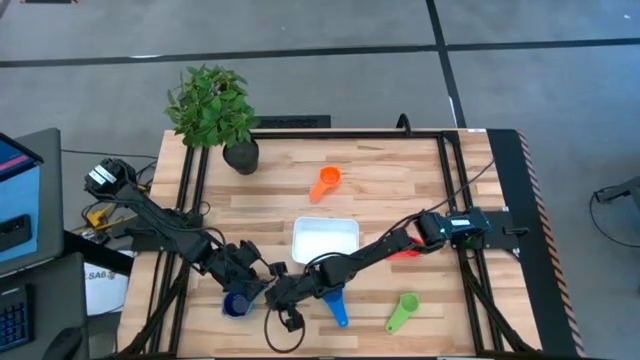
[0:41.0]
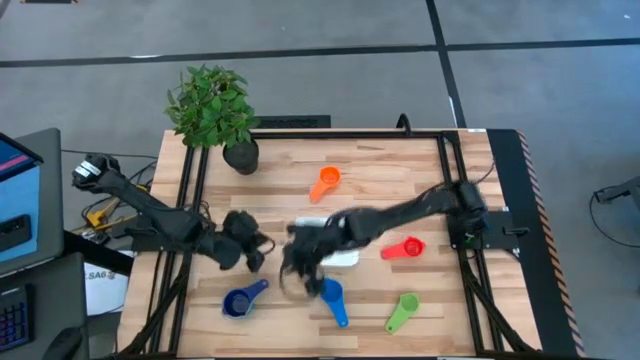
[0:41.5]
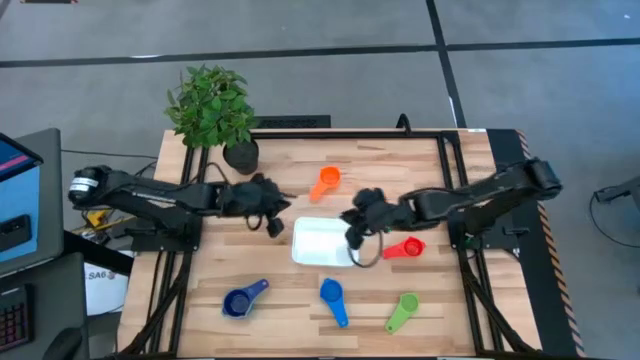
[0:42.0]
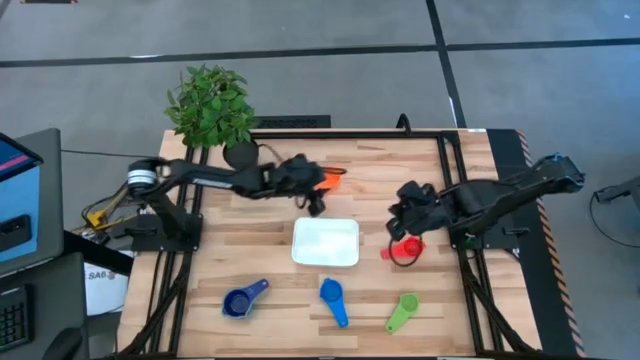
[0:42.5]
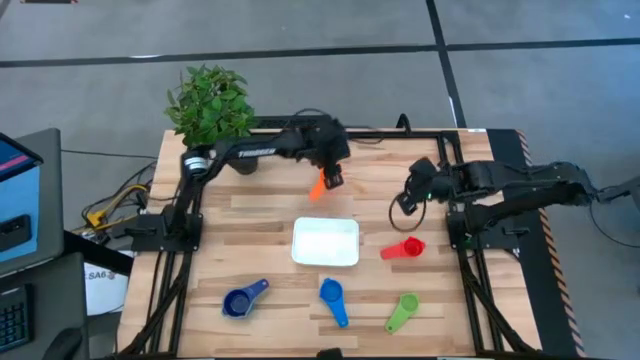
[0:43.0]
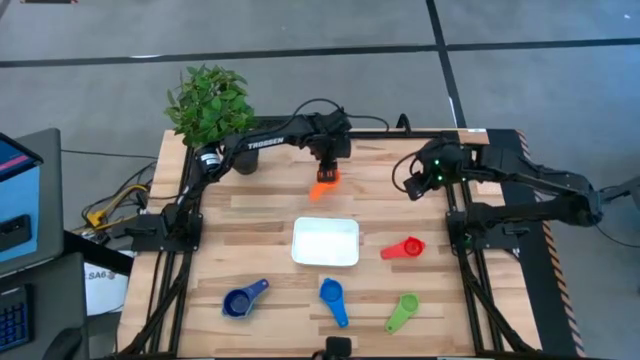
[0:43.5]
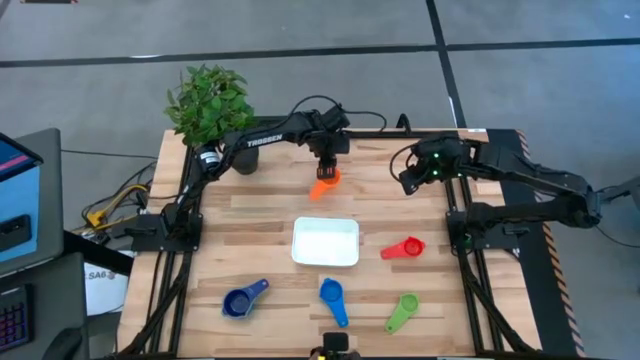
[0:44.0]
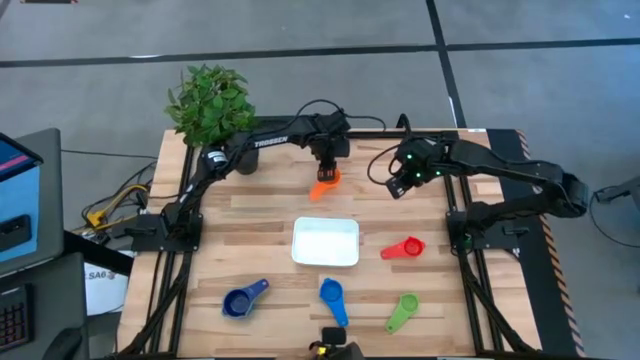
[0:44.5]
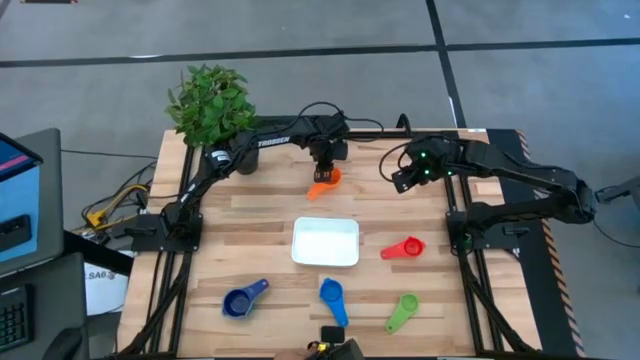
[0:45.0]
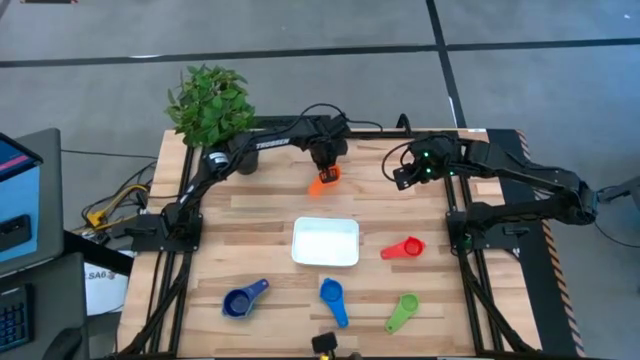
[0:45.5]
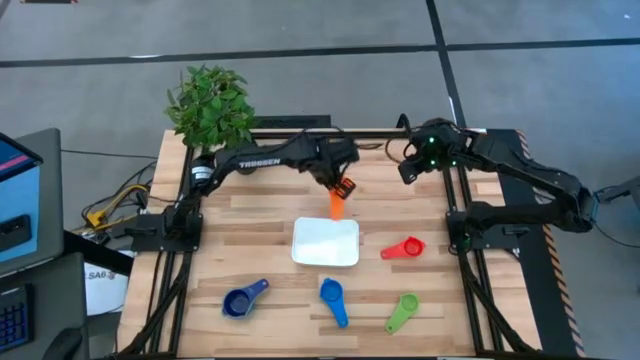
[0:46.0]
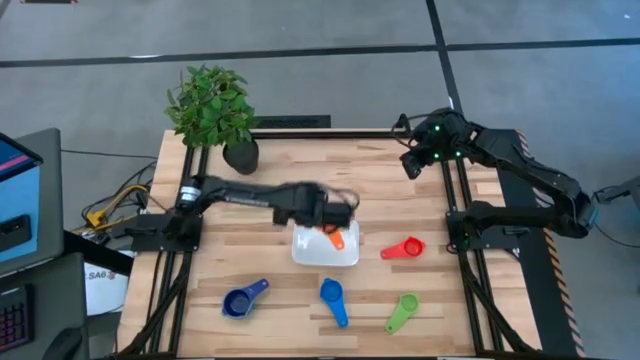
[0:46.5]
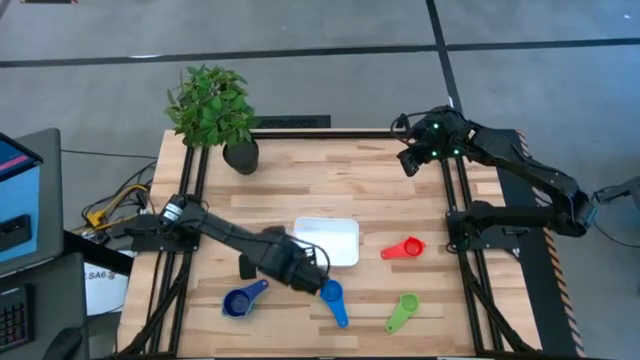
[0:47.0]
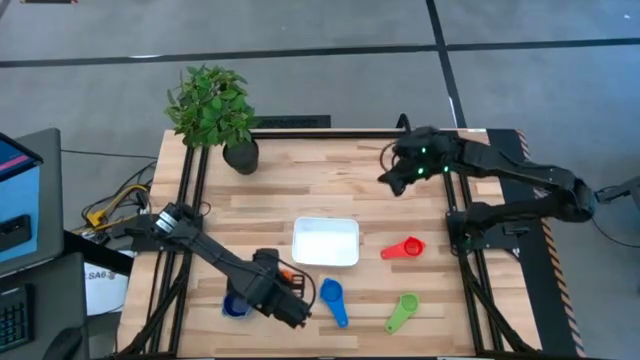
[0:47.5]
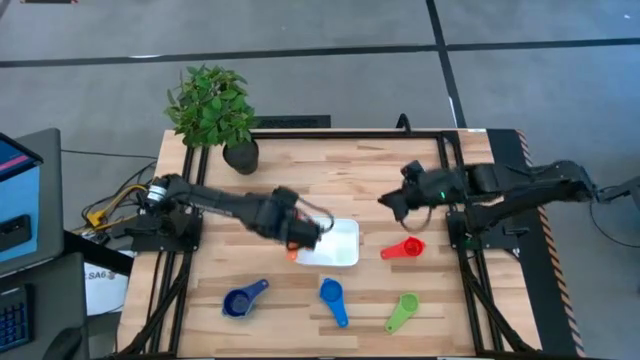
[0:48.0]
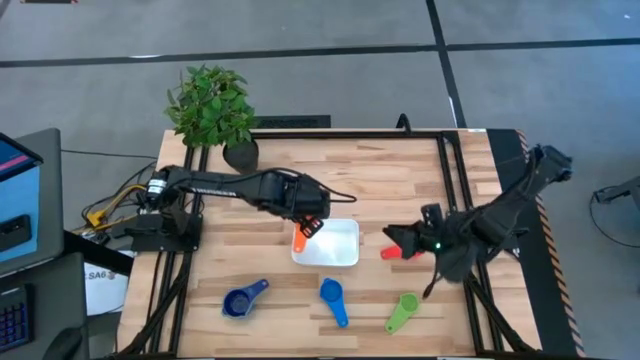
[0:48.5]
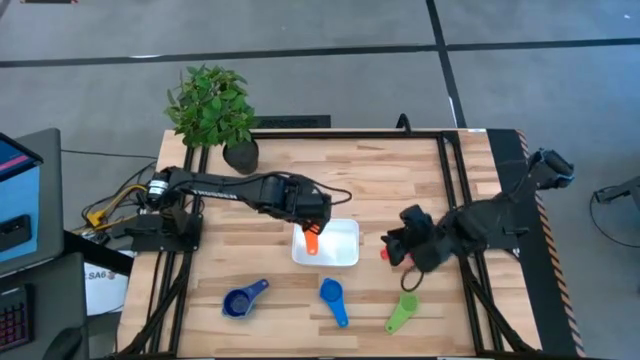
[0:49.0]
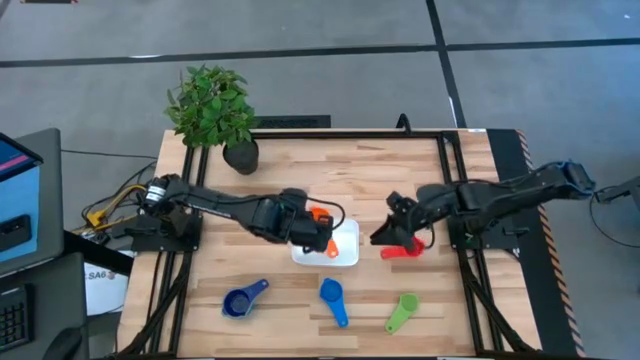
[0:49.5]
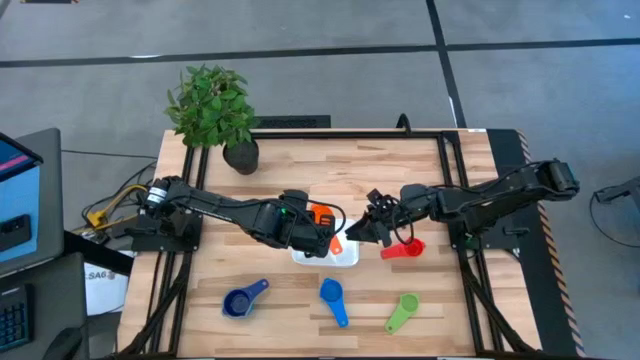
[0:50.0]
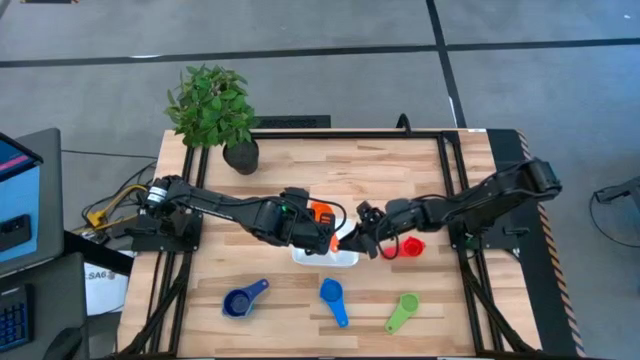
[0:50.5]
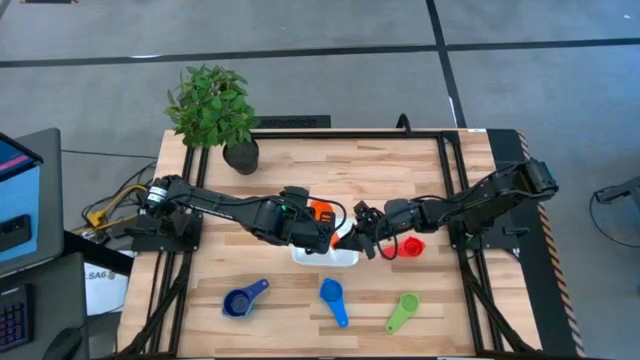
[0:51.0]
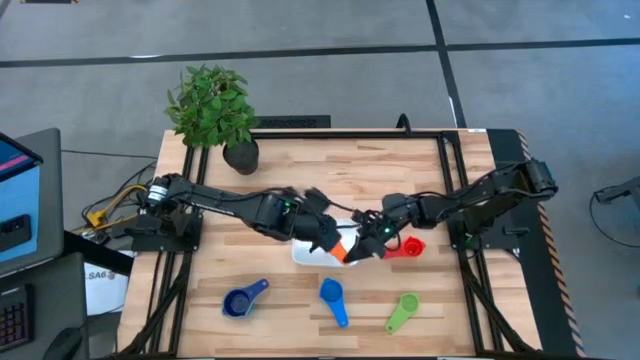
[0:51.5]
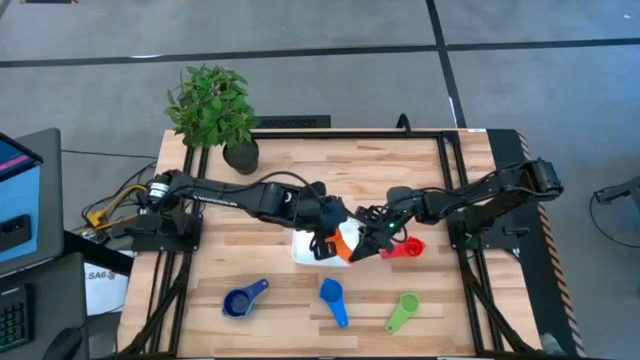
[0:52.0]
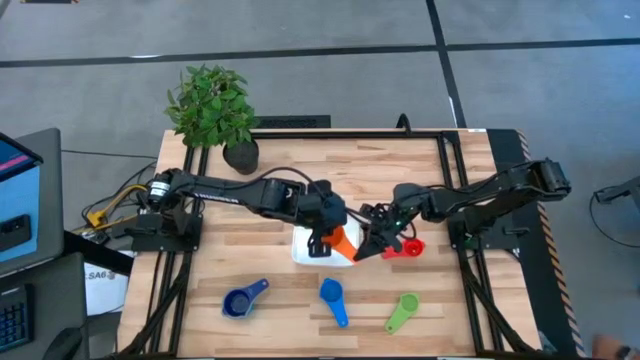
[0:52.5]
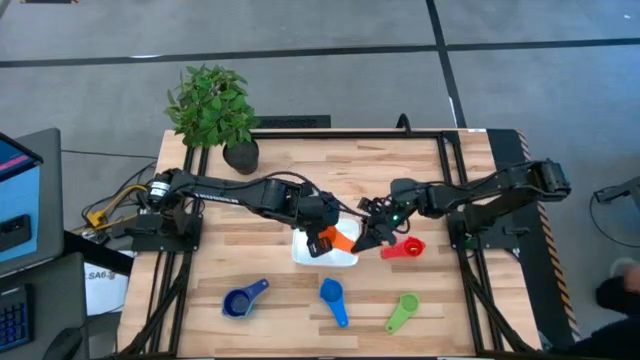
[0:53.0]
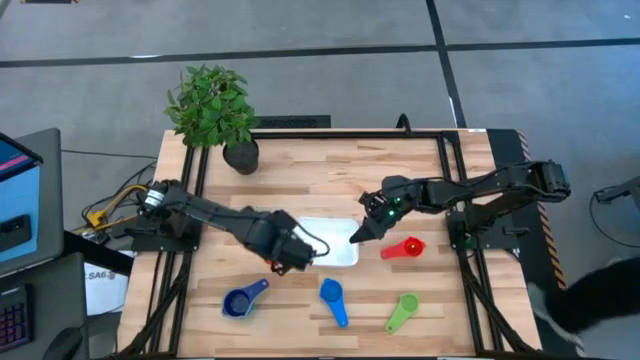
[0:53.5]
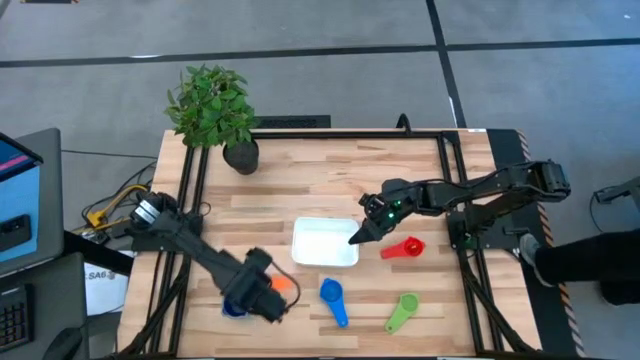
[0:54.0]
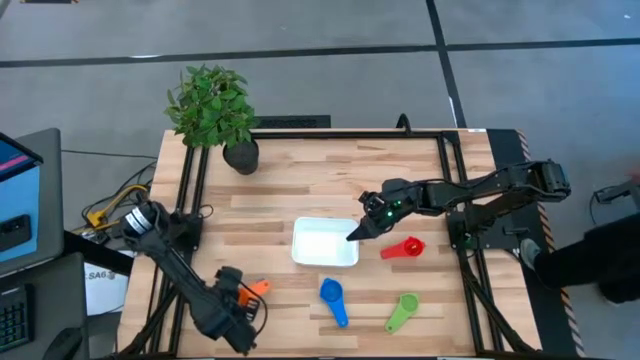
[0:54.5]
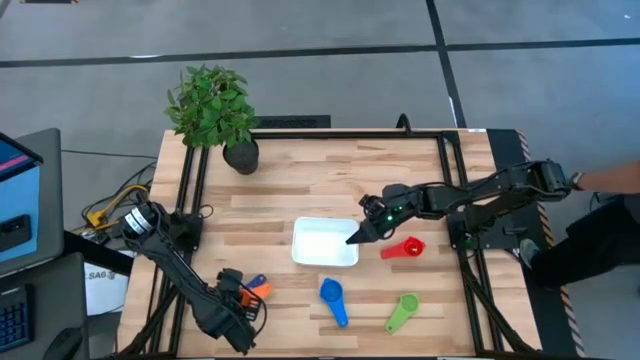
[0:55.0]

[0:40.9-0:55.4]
Task: Nest measuring cups in basket
Stack the orange measuring cup into the purple measuring cup

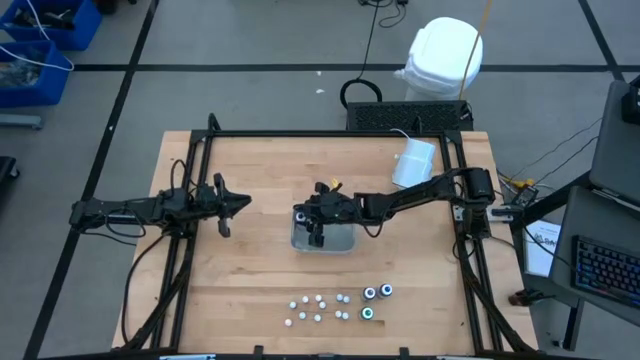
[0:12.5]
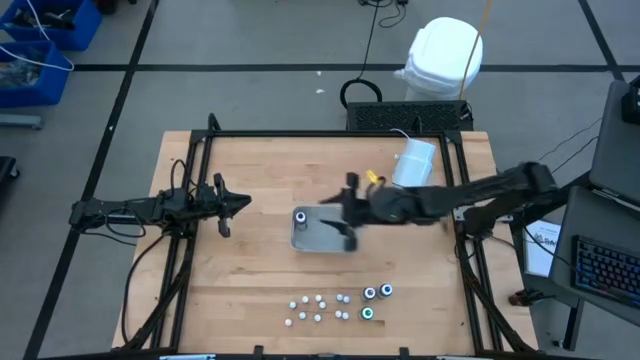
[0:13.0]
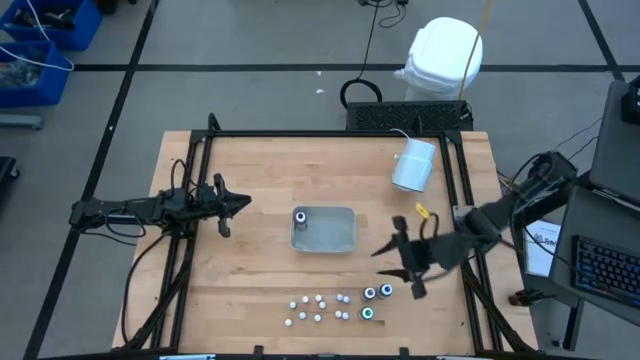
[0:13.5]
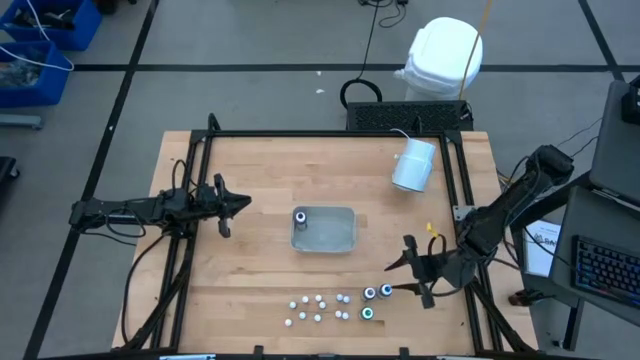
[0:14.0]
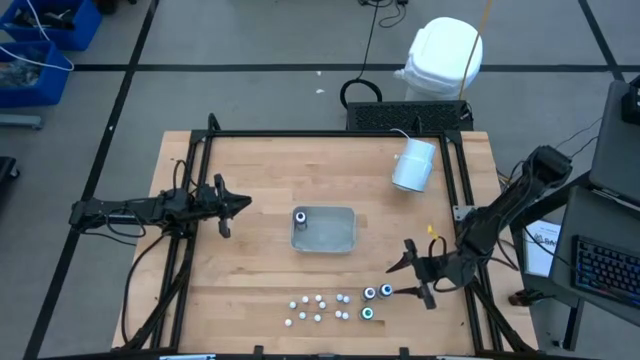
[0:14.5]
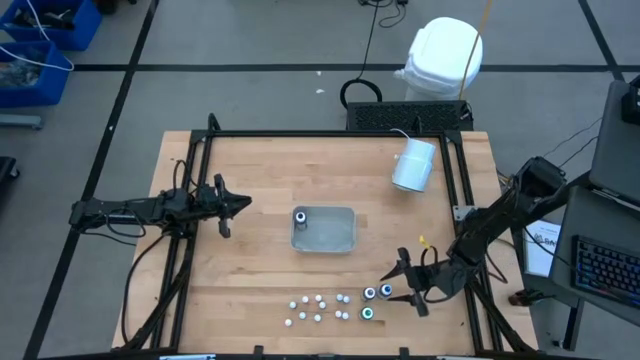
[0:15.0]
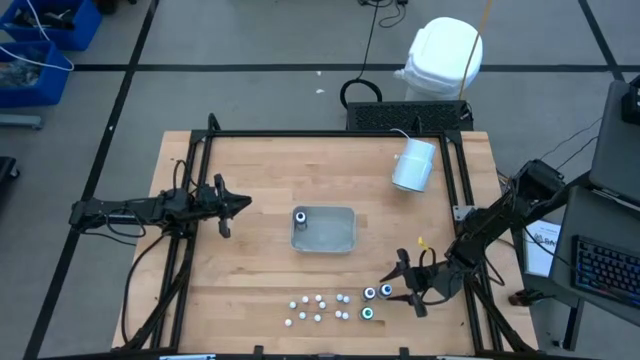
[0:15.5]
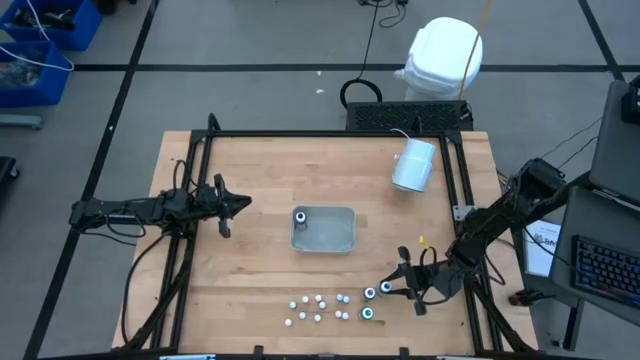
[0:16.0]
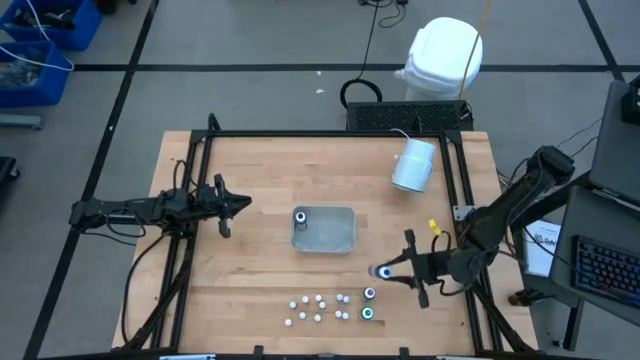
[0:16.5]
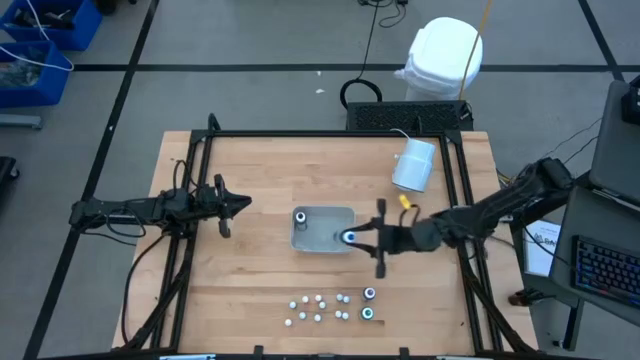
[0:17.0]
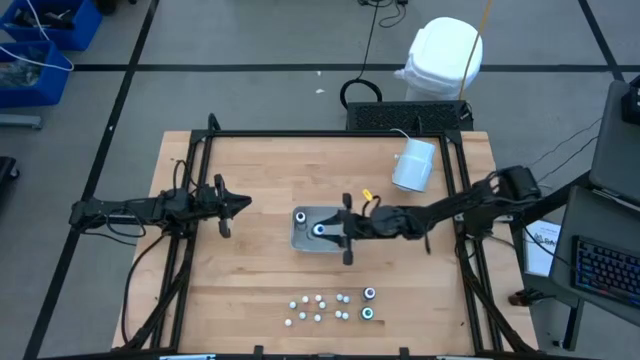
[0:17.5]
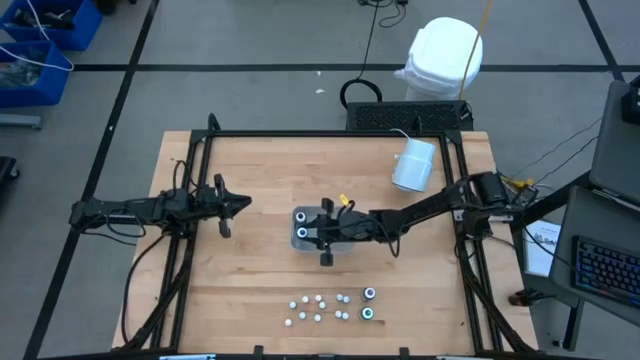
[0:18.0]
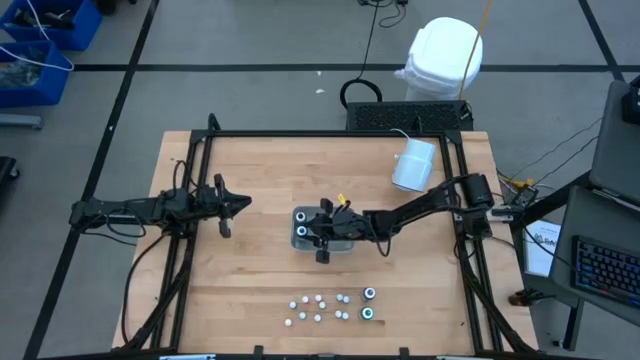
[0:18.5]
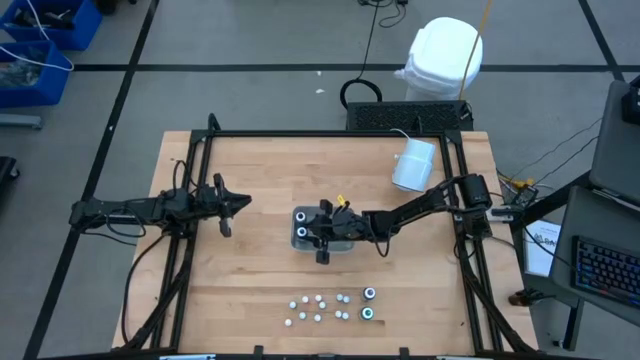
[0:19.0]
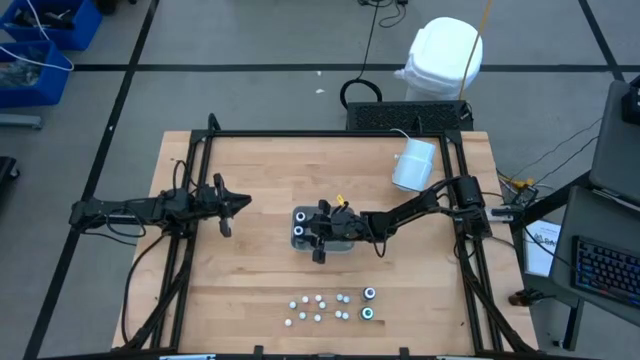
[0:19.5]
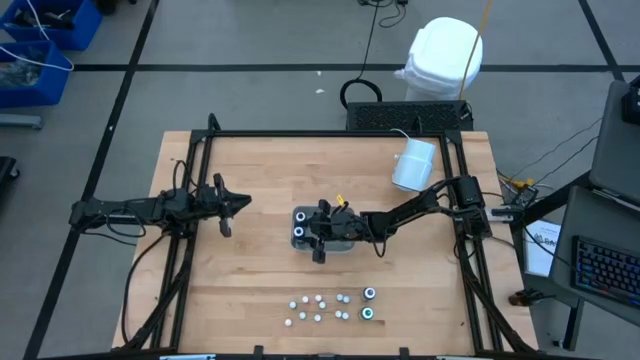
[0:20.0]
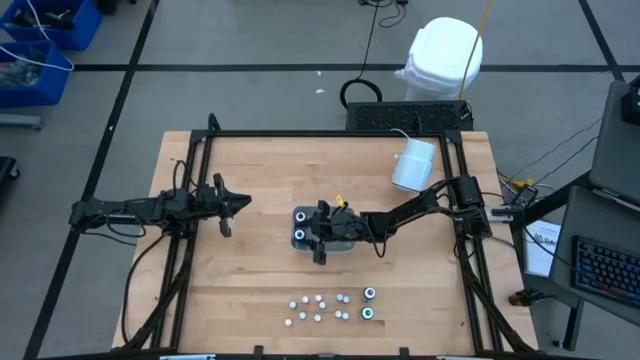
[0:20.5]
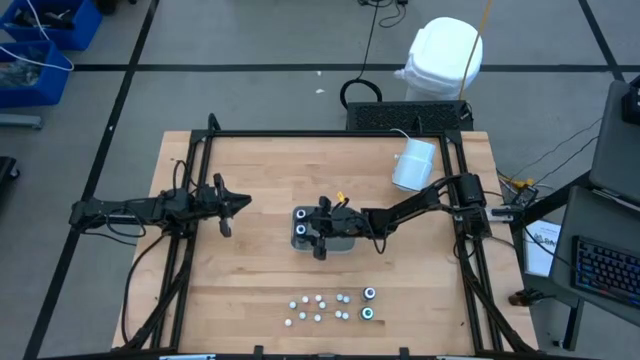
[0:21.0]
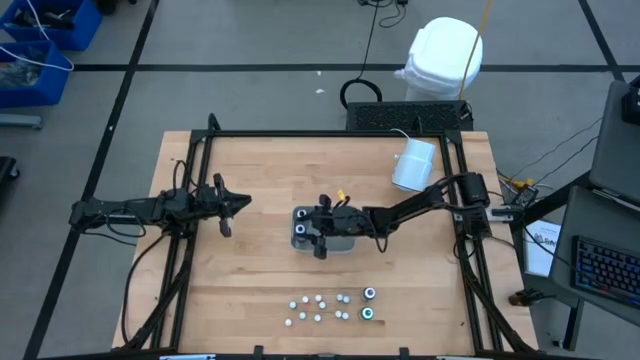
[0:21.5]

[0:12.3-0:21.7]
Task: Pick & Place food coloring
Put the big blue bottle into the gray bin
